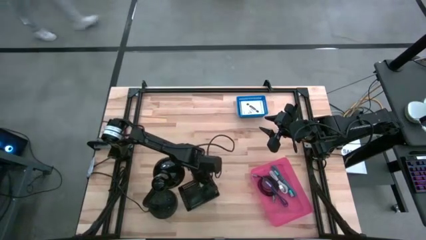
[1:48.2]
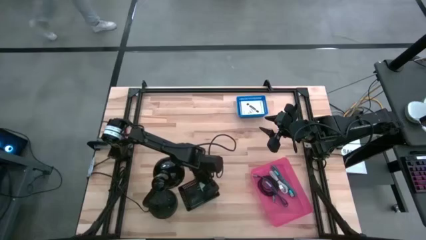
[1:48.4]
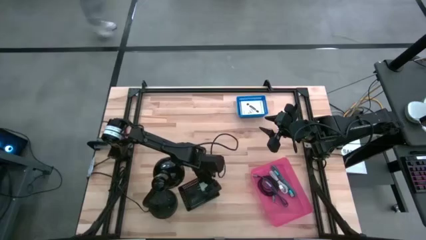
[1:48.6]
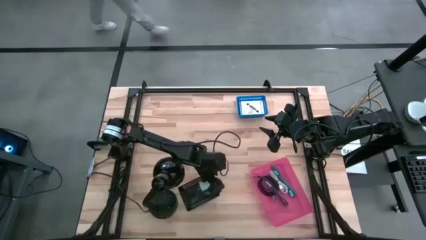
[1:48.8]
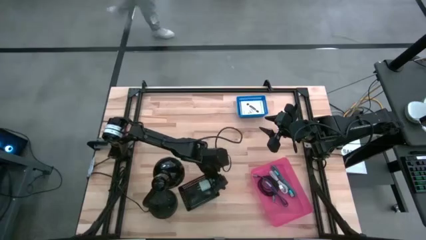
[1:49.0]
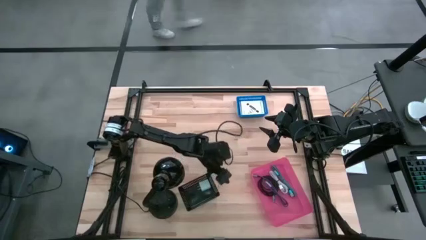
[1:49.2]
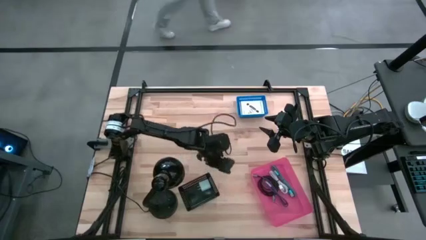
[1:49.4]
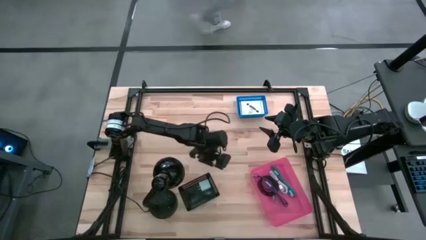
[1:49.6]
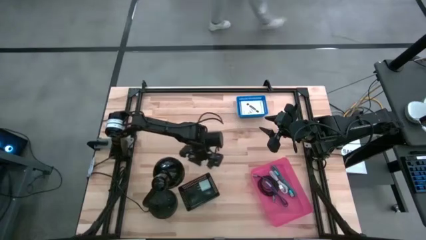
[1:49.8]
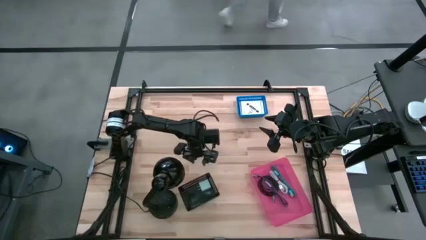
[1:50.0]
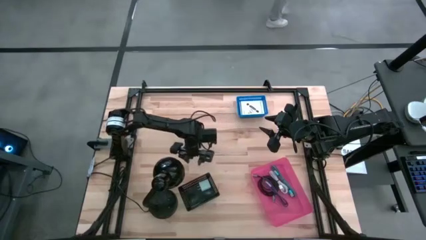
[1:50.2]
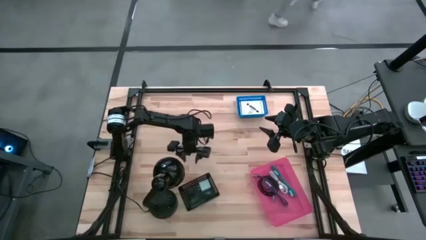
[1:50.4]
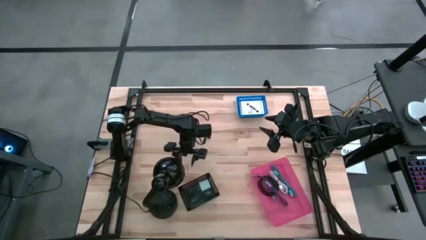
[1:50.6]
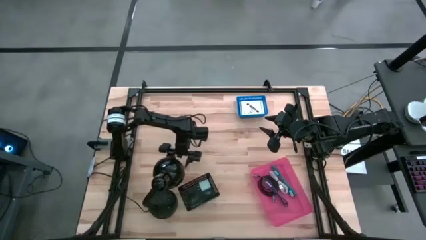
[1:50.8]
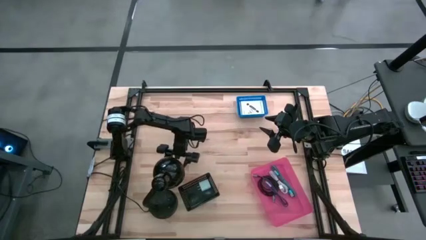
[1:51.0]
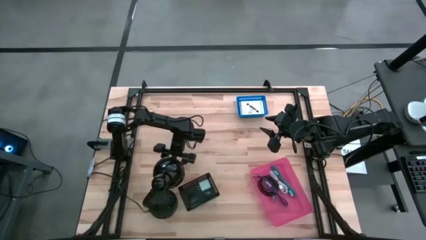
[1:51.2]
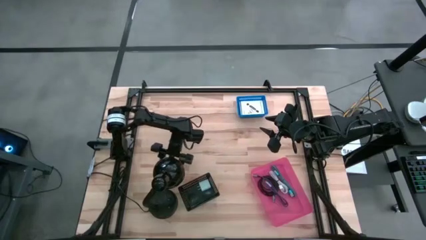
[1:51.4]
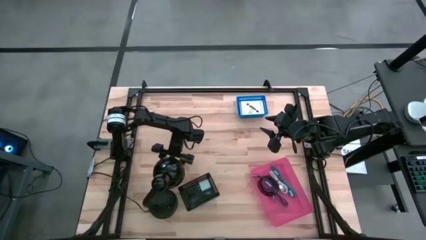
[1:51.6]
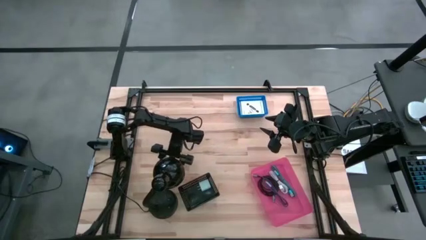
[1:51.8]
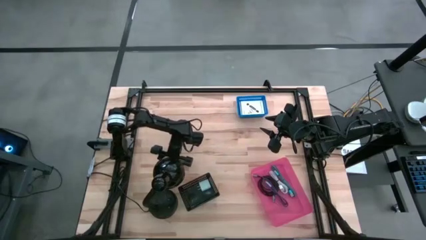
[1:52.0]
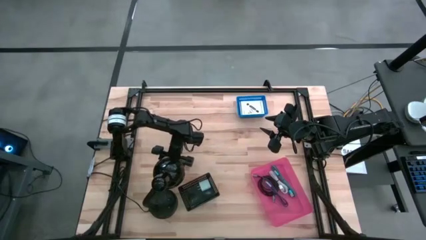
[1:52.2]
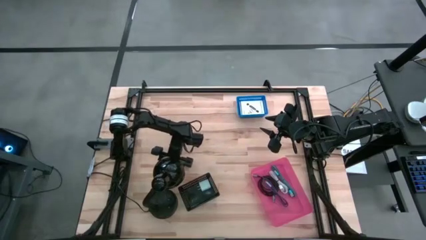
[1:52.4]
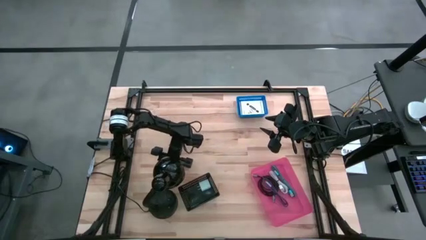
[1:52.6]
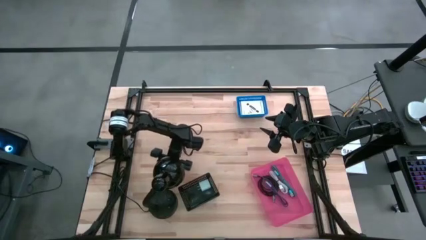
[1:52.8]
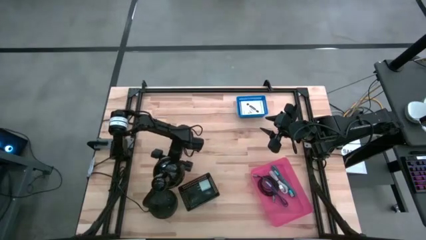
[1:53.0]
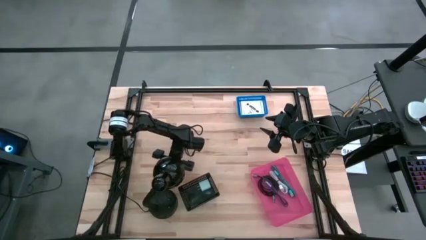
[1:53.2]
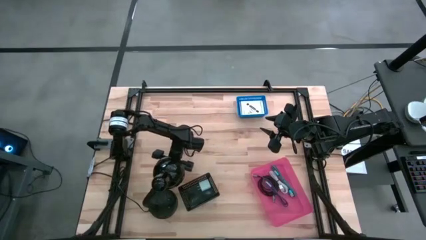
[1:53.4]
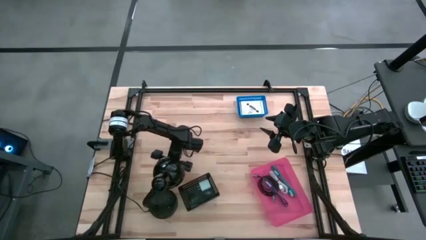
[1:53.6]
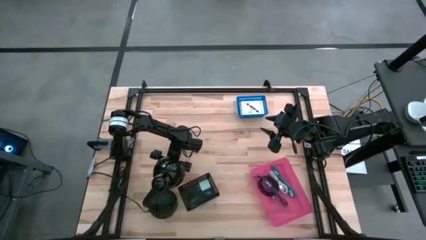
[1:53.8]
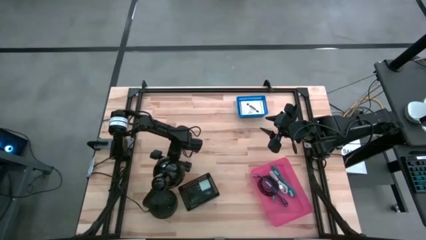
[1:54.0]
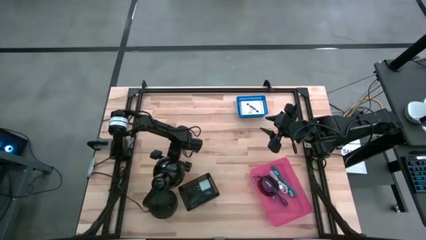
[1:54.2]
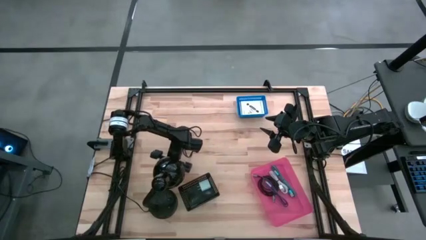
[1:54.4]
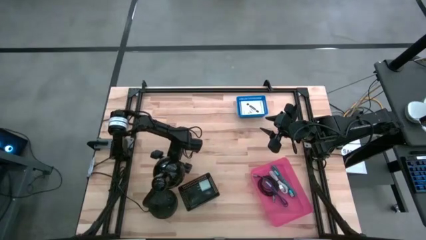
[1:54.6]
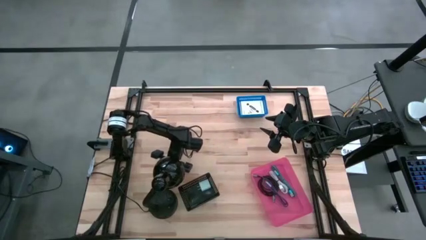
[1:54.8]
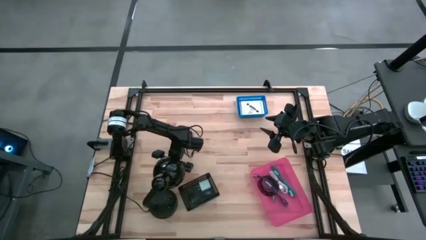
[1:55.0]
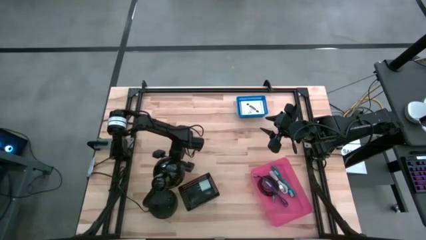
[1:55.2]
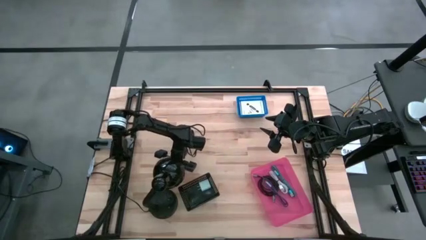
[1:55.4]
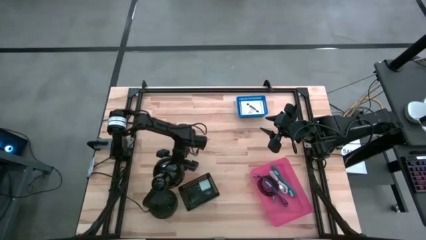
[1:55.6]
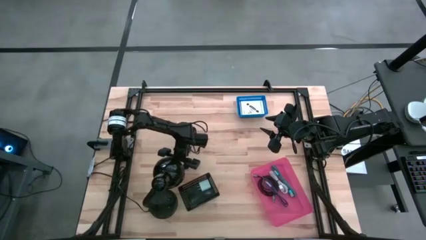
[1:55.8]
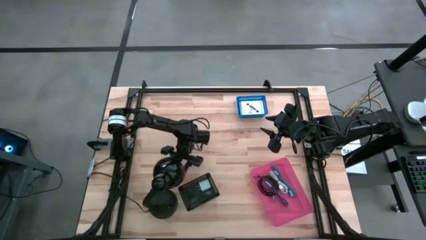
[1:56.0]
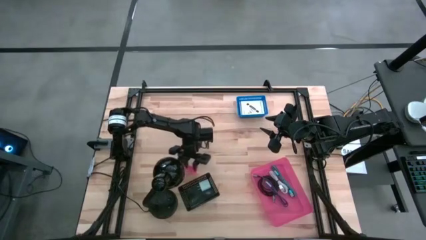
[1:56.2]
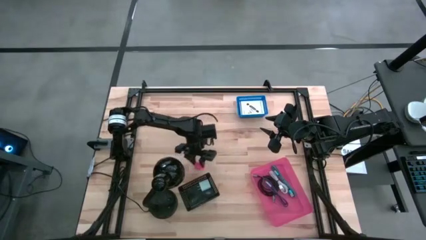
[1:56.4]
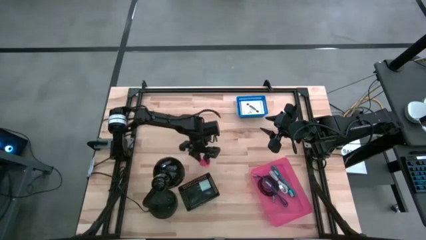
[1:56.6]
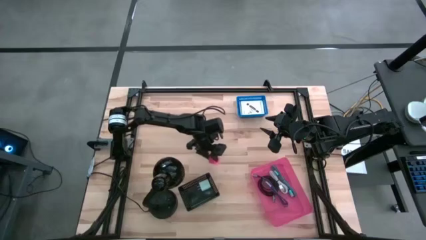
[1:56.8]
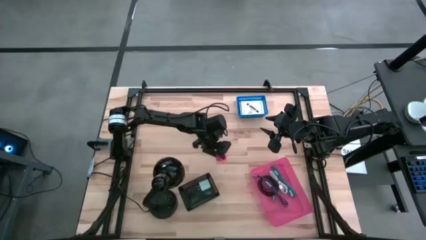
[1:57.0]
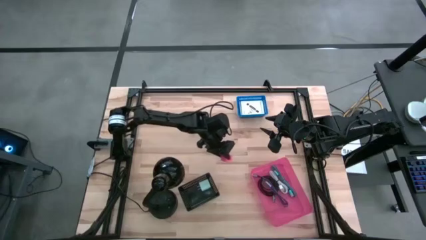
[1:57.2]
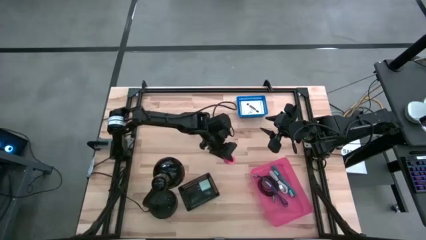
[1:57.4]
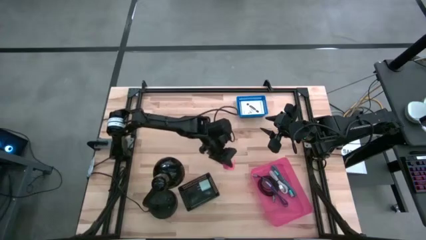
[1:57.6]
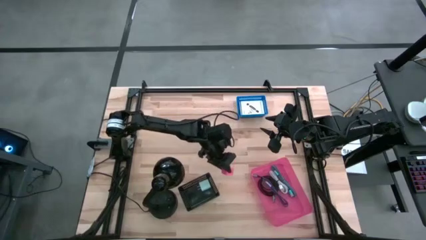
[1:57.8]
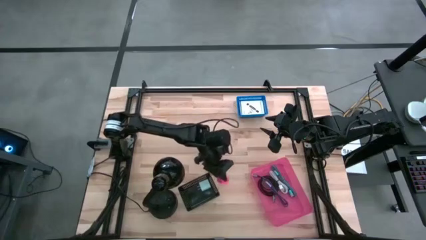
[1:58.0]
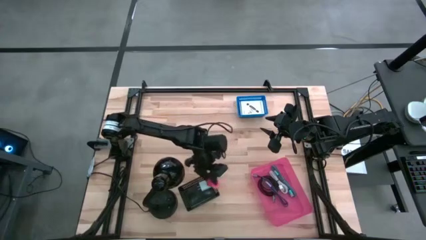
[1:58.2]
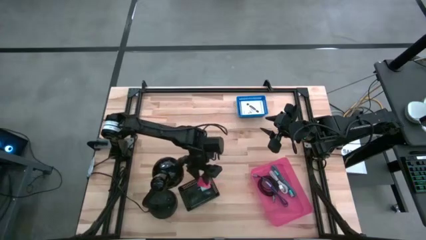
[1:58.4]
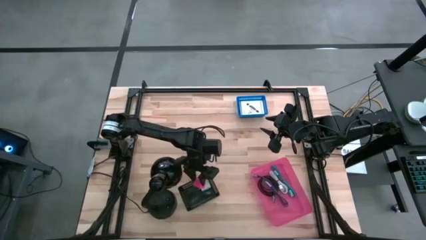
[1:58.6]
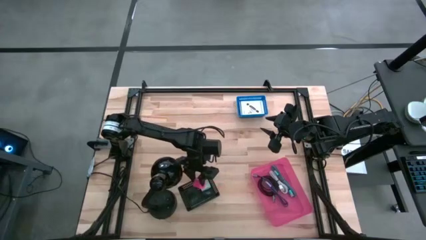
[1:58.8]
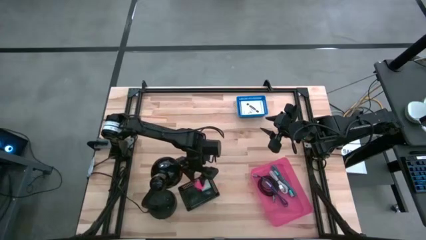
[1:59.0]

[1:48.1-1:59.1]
Task: Pick and place items into bin
Put the pink charger adapter into the black bin

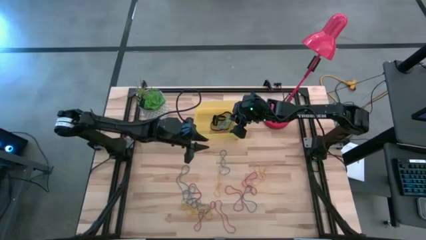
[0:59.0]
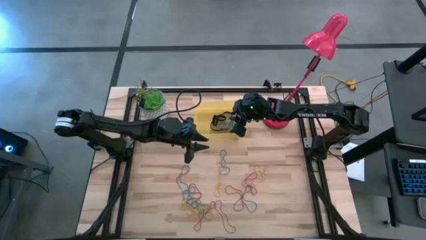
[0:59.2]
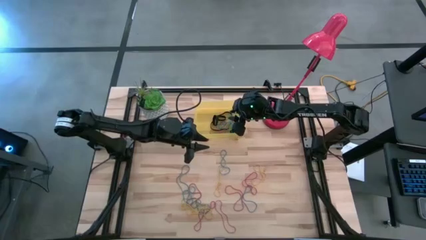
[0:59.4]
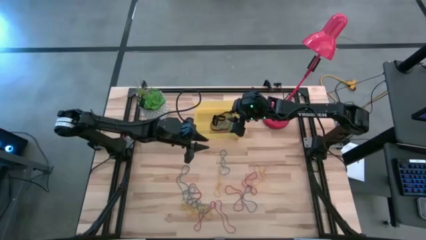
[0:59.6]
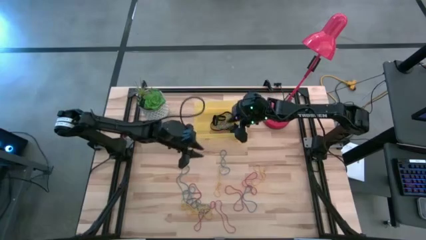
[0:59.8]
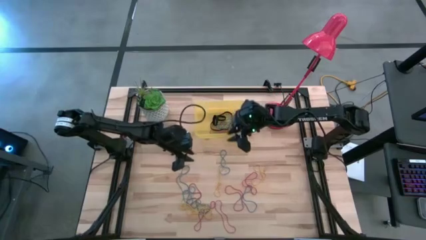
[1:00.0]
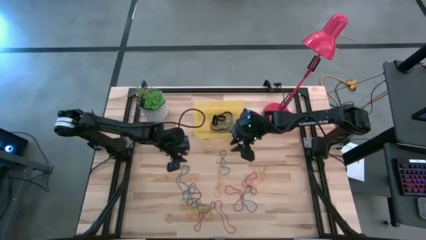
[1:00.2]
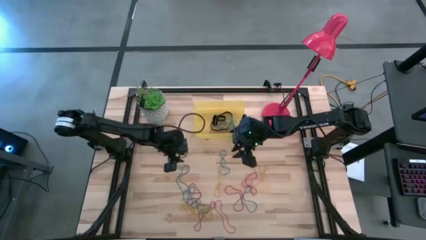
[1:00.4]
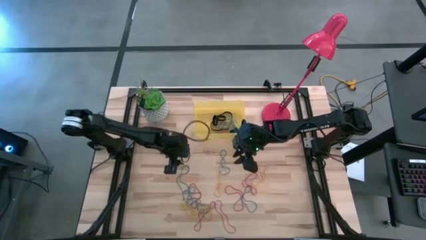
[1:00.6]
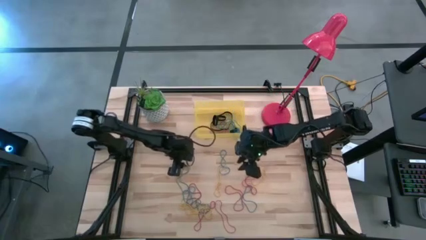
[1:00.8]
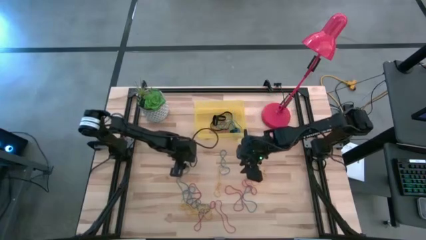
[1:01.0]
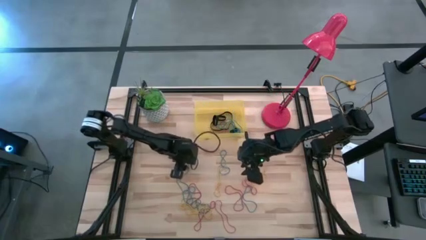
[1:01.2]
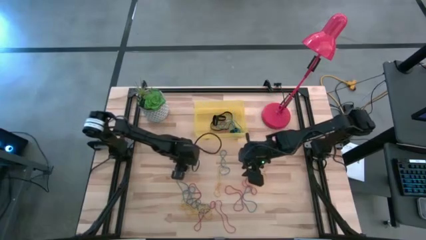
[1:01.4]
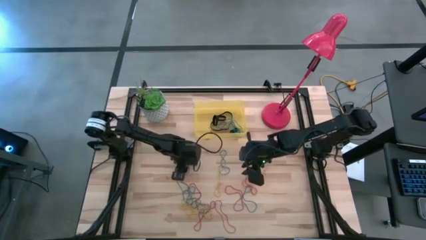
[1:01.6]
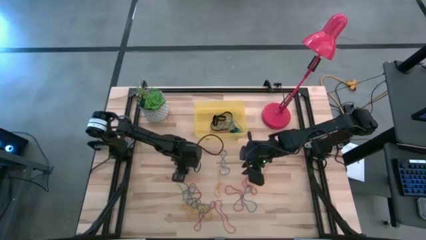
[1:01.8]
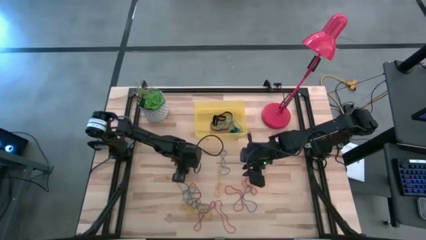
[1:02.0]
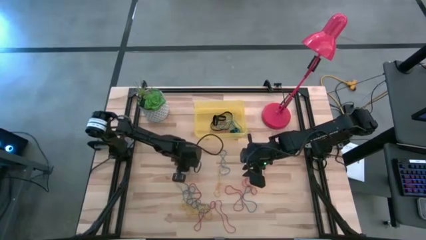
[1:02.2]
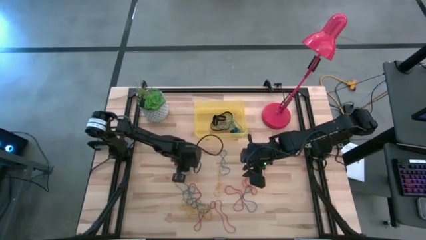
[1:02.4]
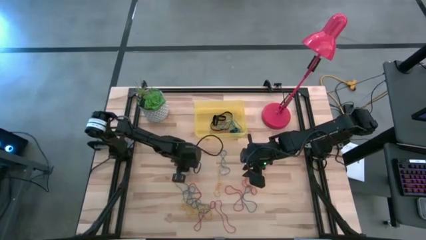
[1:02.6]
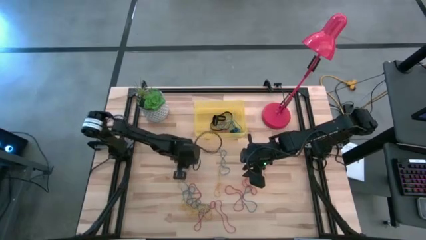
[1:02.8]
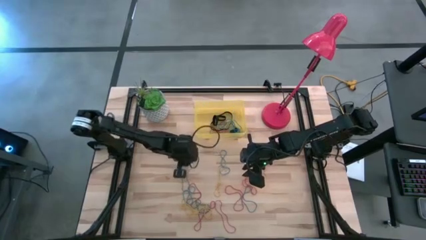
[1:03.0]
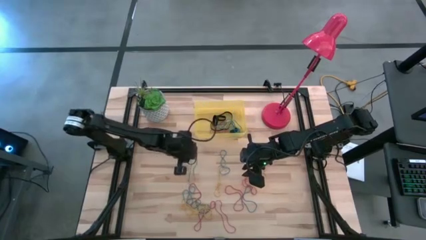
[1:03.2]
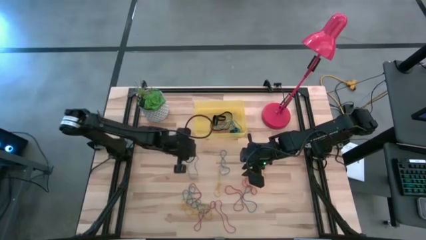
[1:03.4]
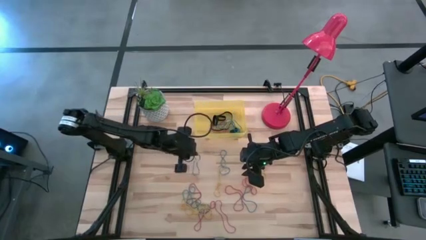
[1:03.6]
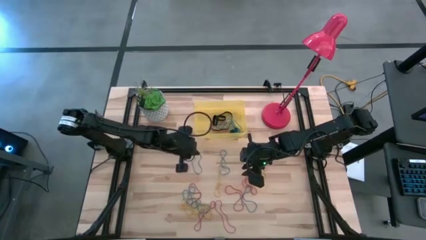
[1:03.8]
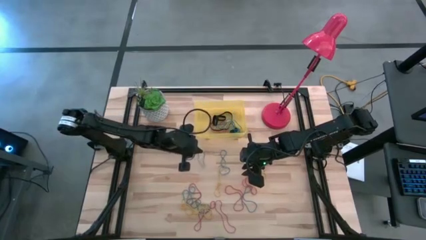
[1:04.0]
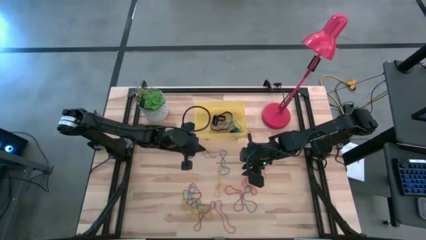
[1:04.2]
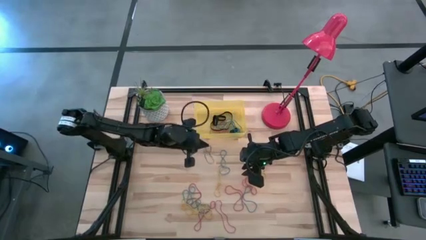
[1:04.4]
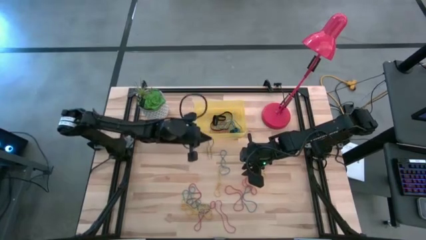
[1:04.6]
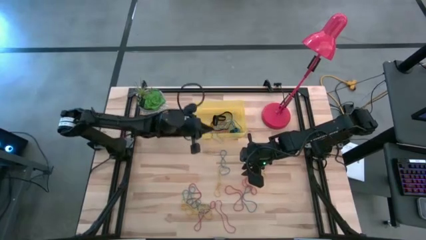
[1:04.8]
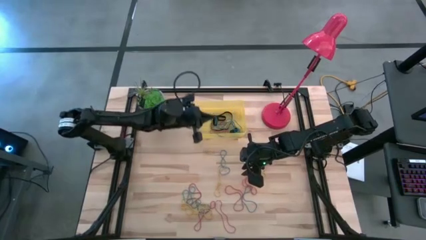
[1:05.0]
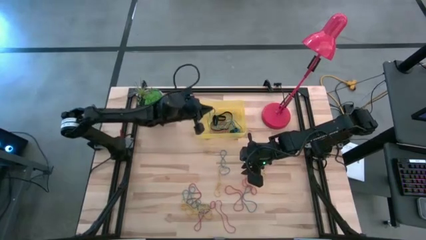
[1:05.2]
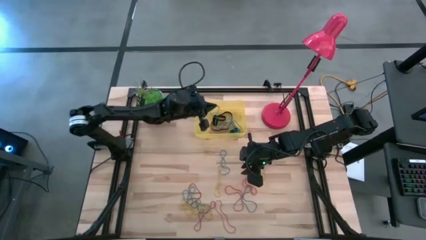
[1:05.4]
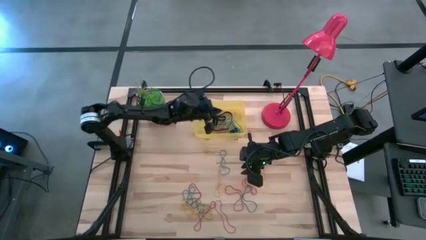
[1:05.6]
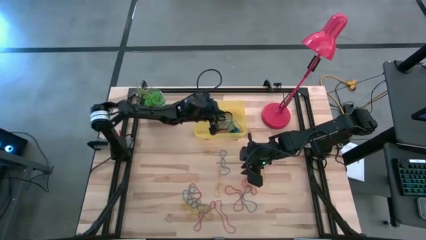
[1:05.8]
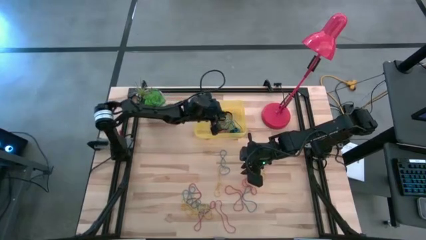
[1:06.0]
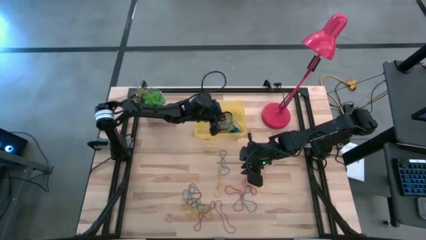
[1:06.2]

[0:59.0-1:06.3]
Task: Pick and place rubber bands into bin
Put the blue rubber band into the yellow bin
